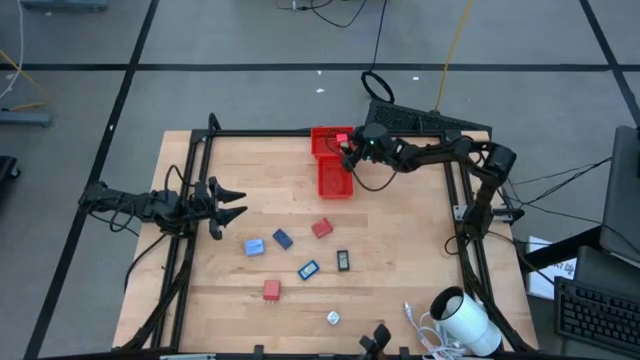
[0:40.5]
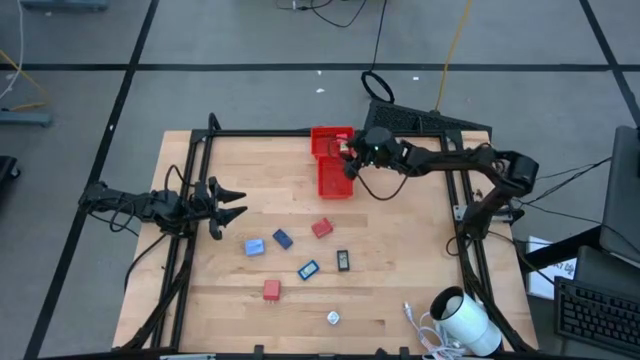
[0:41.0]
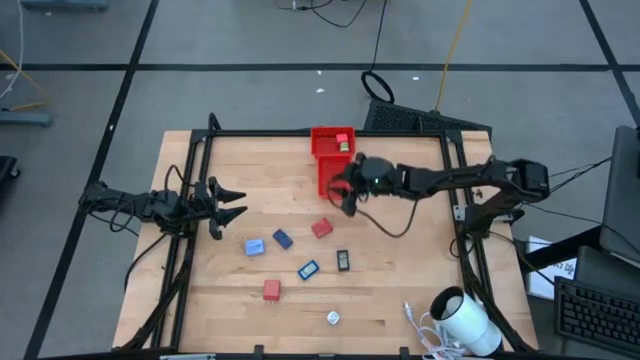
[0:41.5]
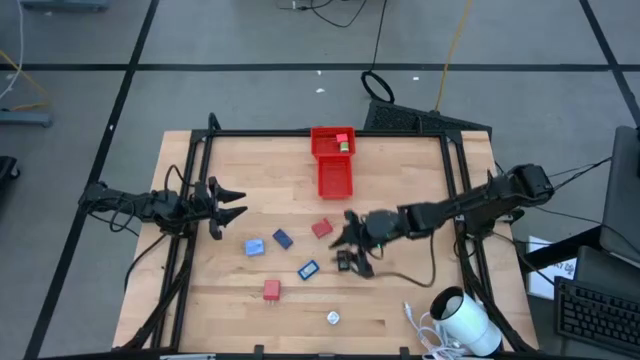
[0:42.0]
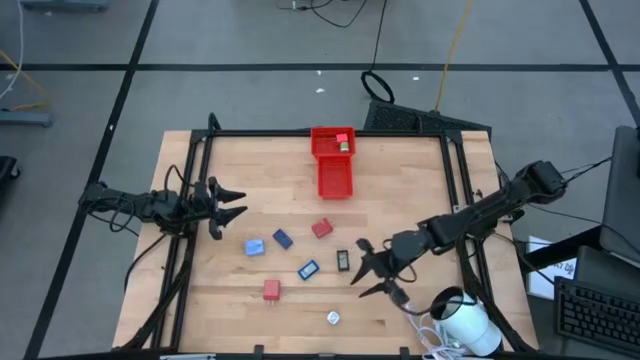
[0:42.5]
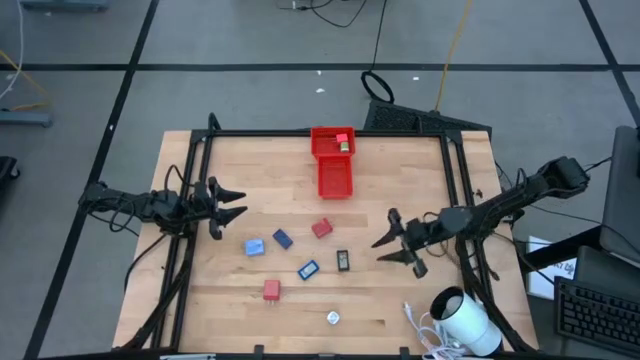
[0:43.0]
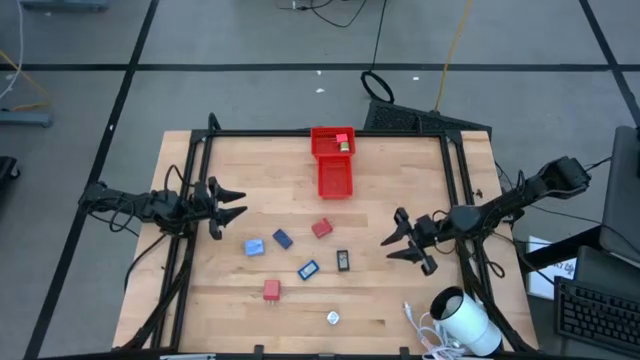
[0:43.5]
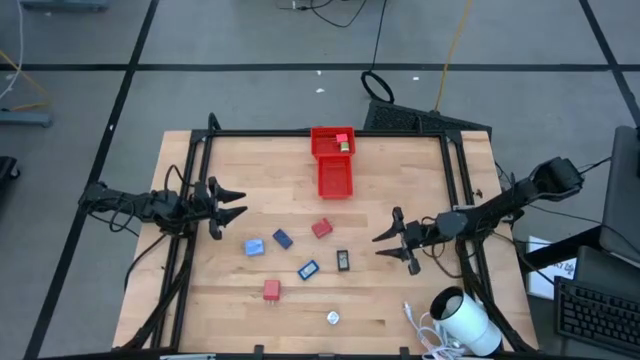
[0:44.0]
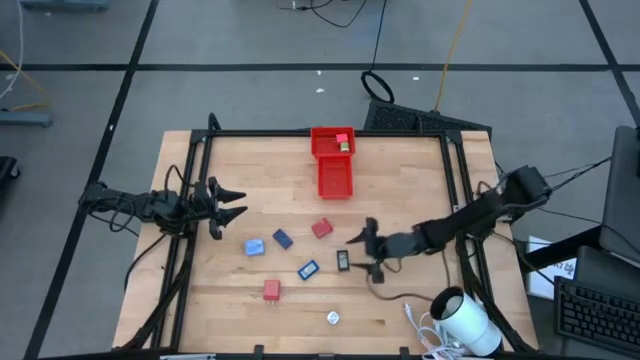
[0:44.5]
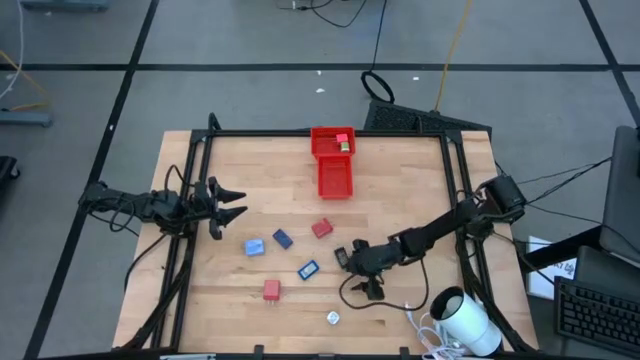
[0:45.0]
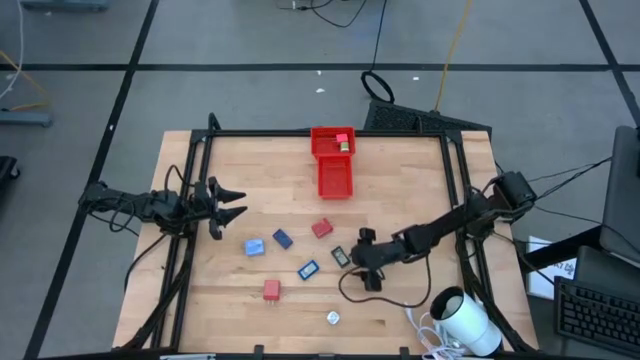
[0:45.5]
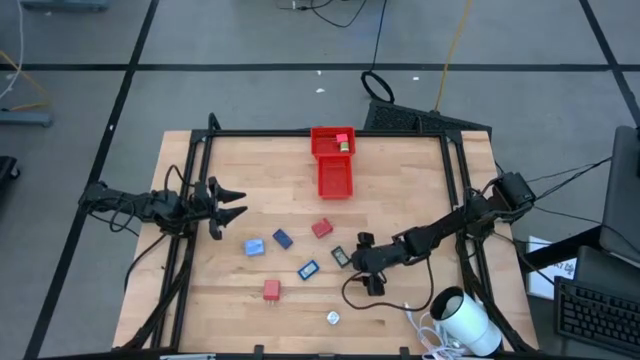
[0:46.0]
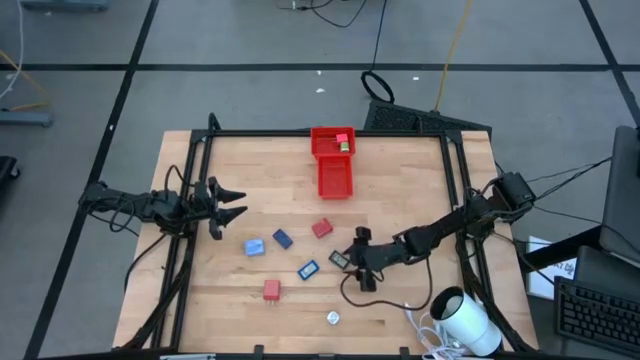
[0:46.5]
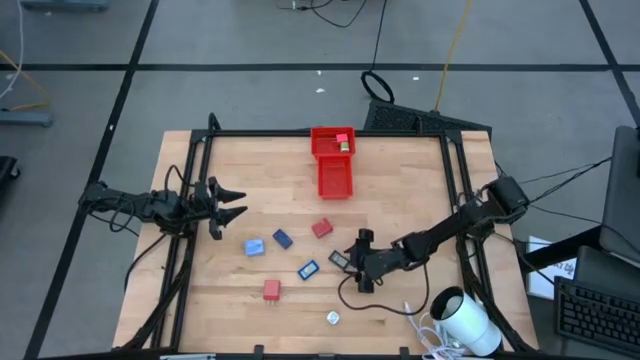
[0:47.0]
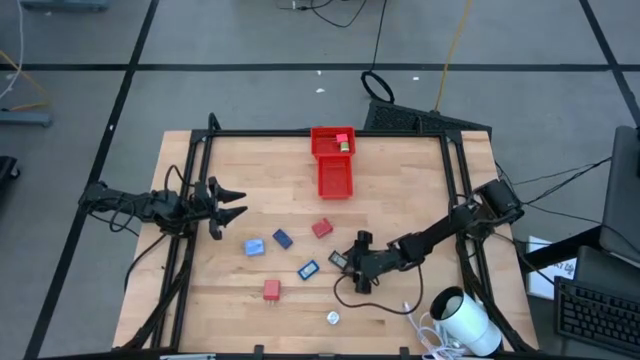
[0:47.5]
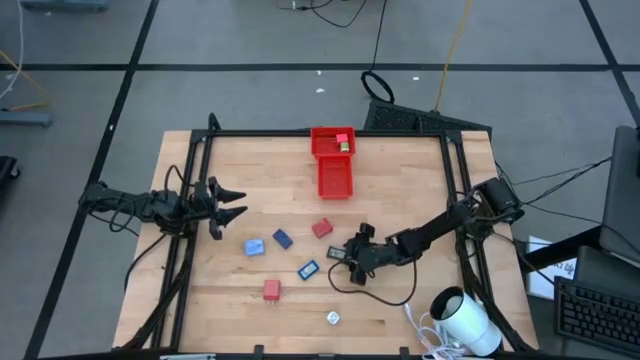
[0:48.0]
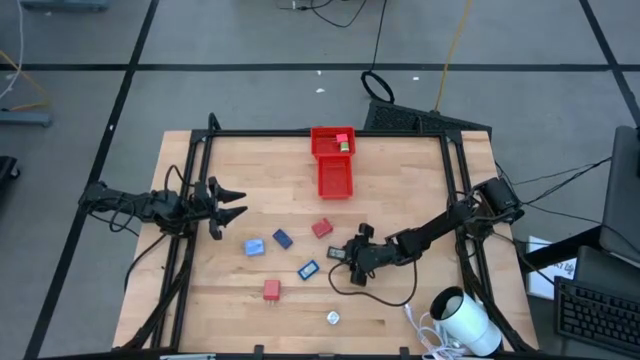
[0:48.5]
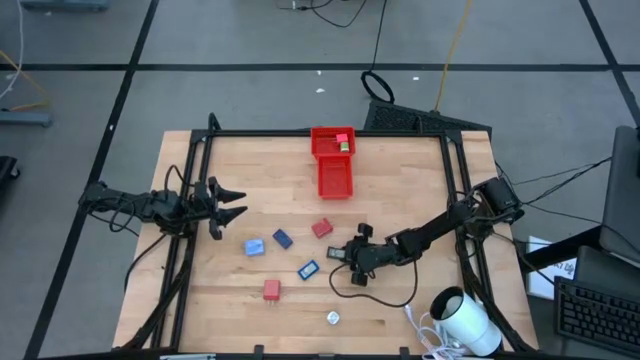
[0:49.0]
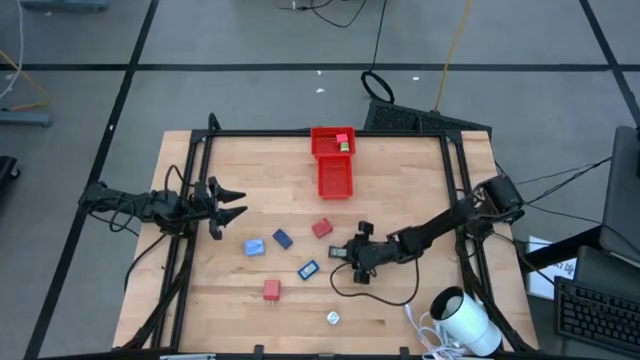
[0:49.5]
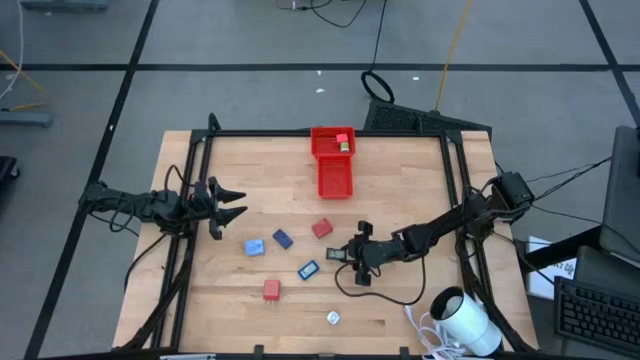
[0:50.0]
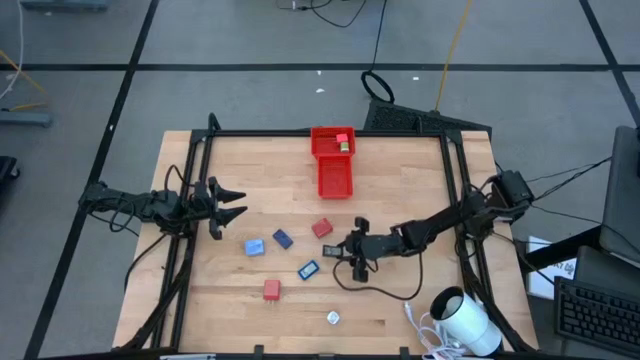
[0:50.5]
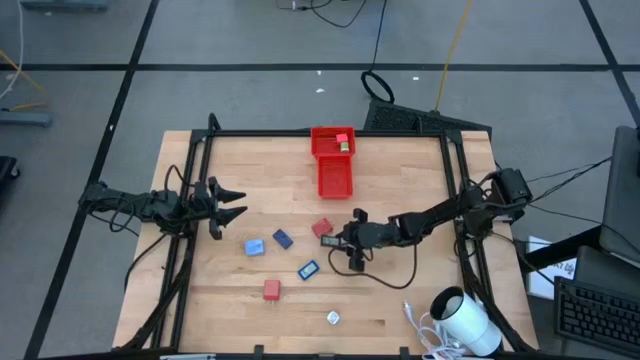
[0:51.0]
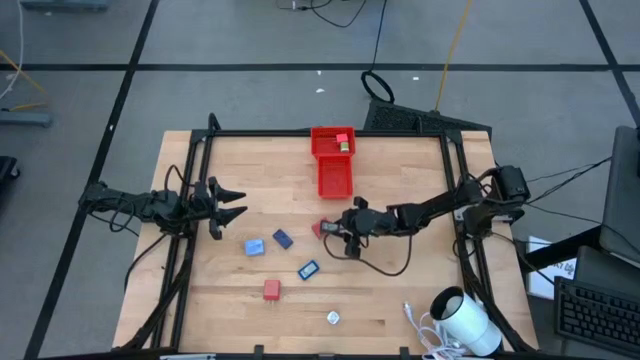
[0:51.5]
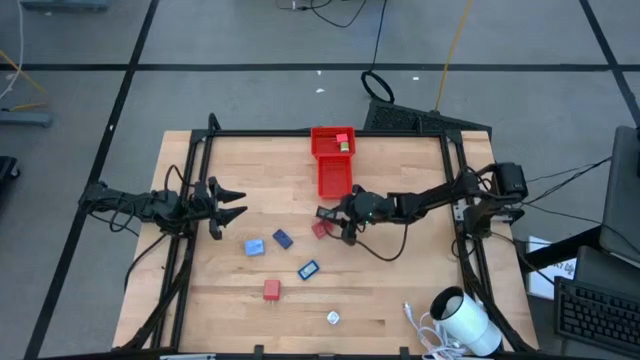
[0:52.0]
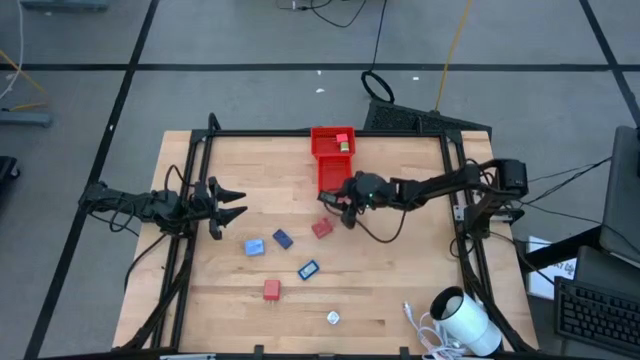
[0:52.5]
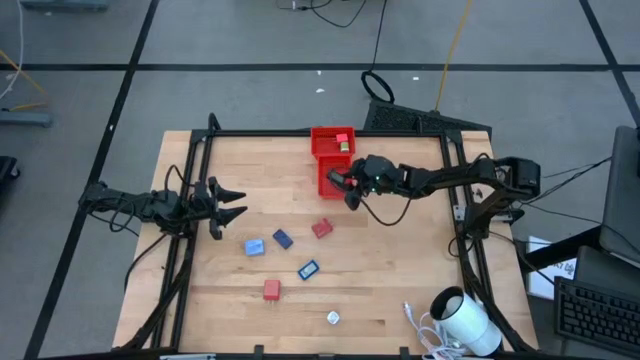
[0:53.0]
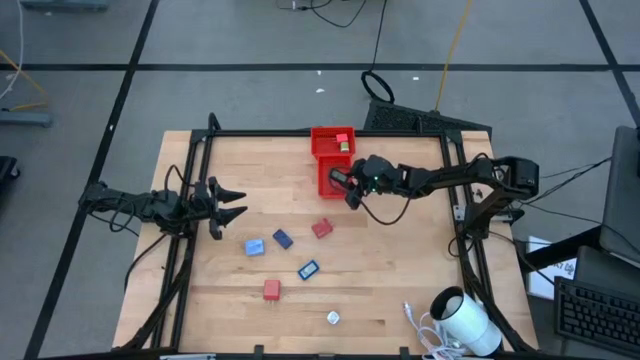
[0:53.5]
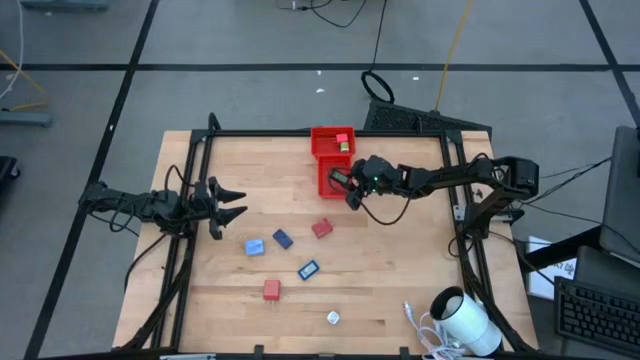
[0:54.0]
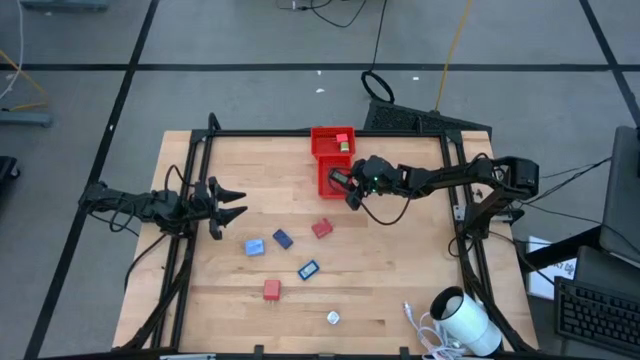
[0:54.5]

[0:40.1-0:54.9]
Task: Pick & Place Office items
Put the black digital timer into the bottom red bin

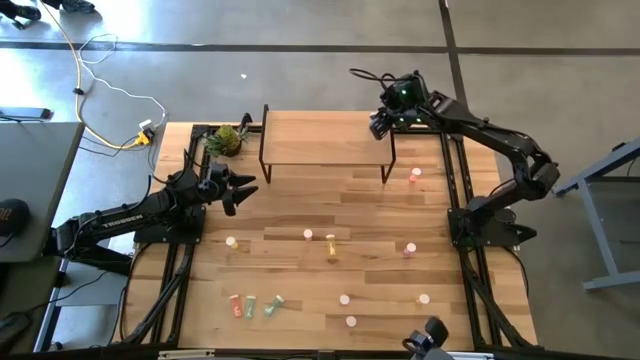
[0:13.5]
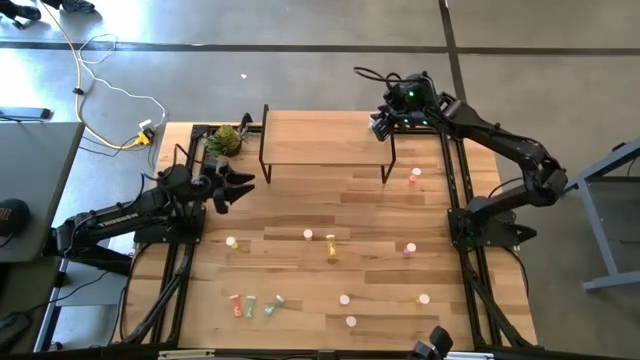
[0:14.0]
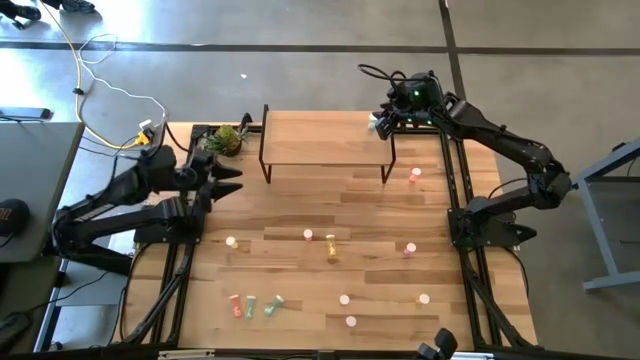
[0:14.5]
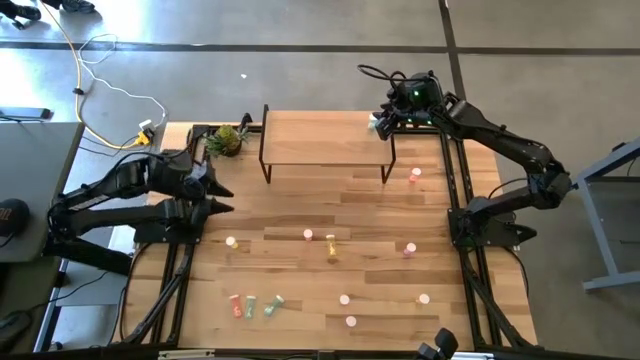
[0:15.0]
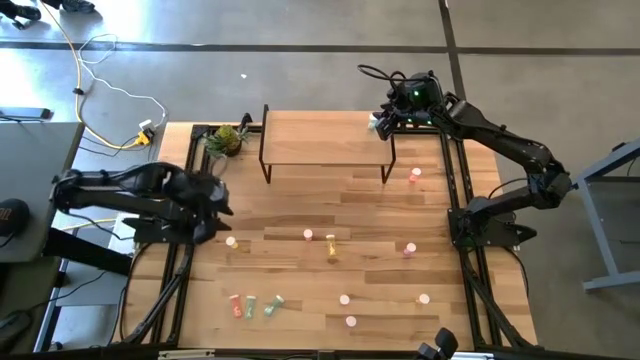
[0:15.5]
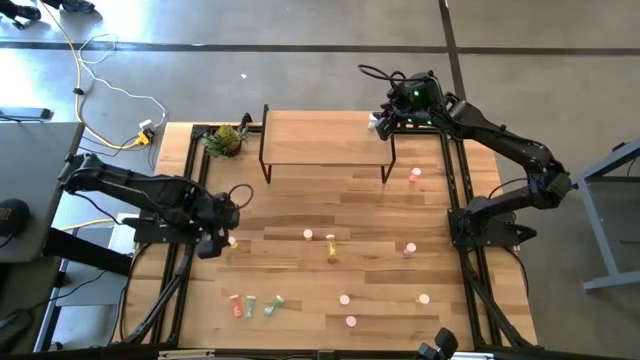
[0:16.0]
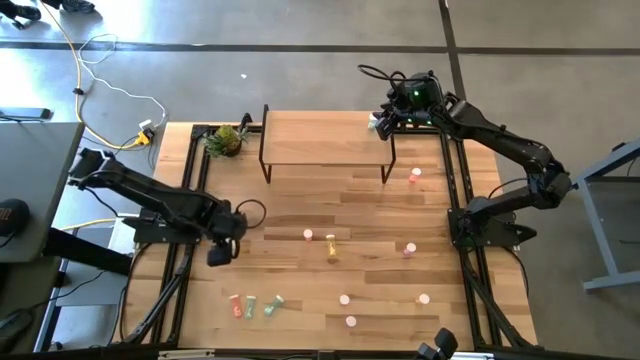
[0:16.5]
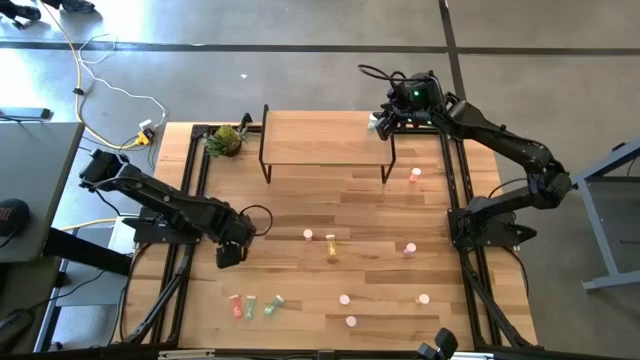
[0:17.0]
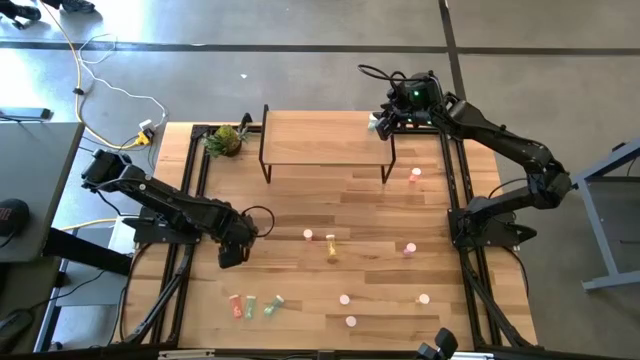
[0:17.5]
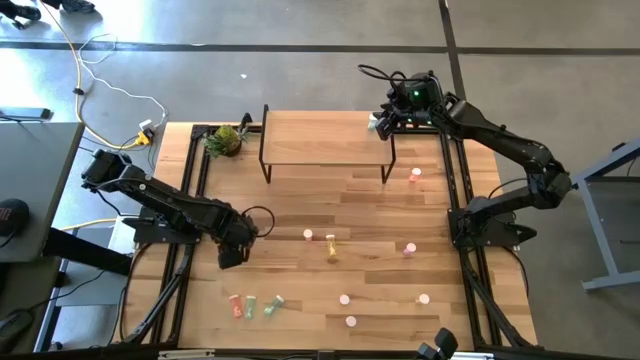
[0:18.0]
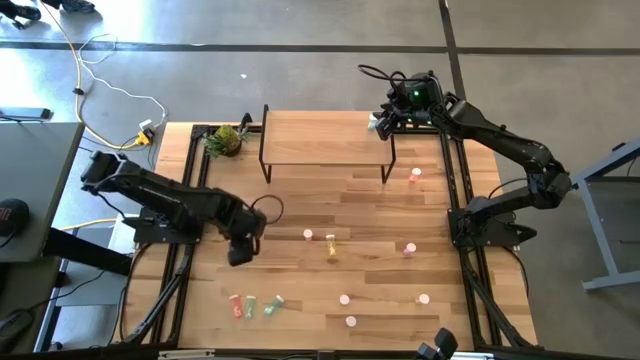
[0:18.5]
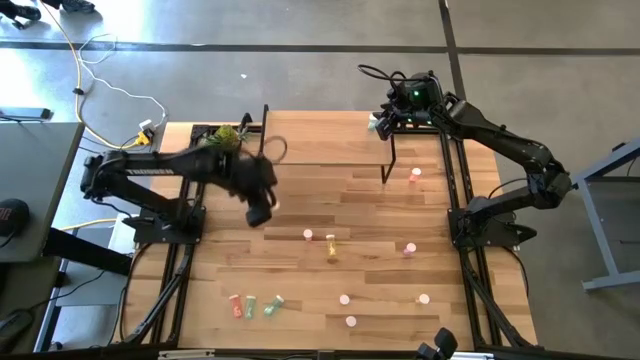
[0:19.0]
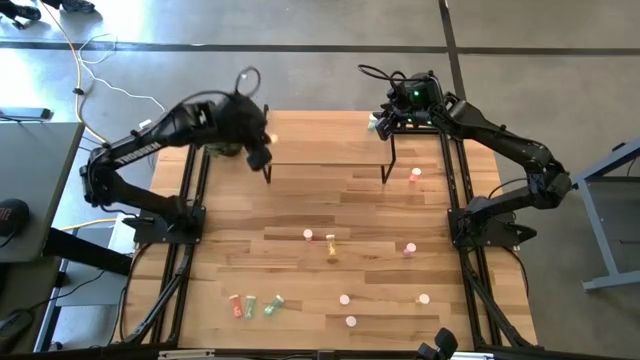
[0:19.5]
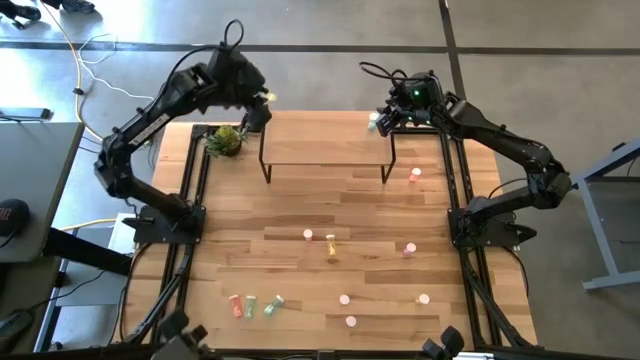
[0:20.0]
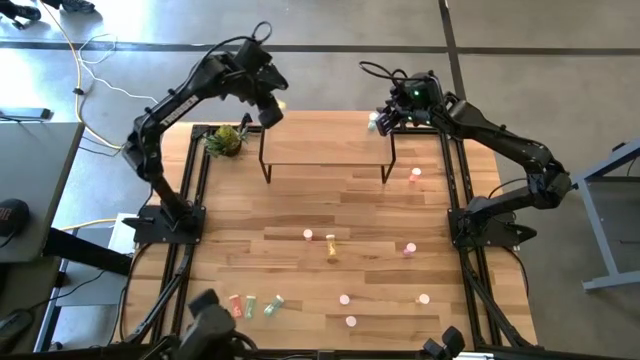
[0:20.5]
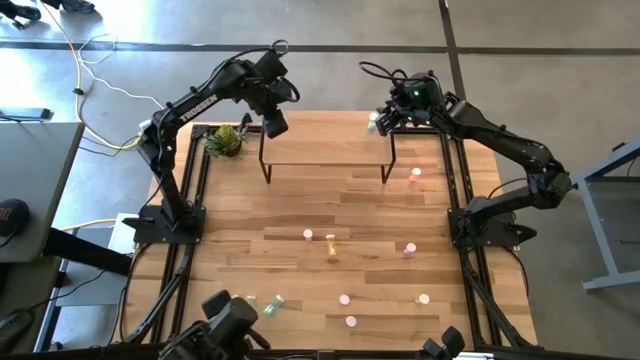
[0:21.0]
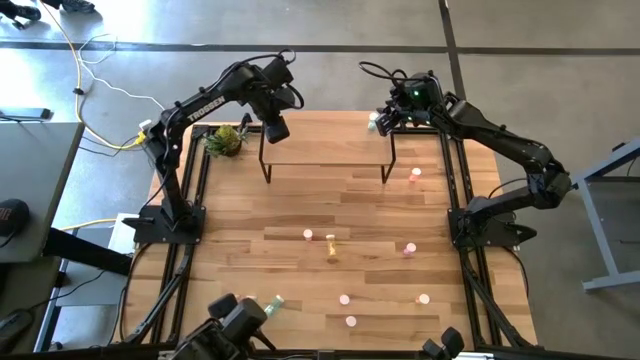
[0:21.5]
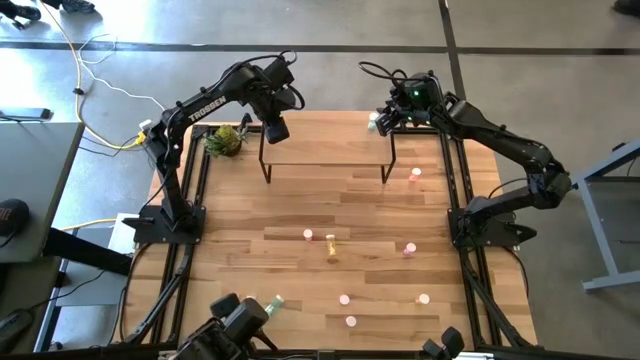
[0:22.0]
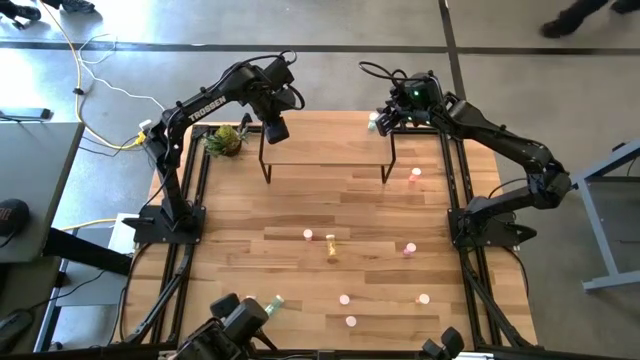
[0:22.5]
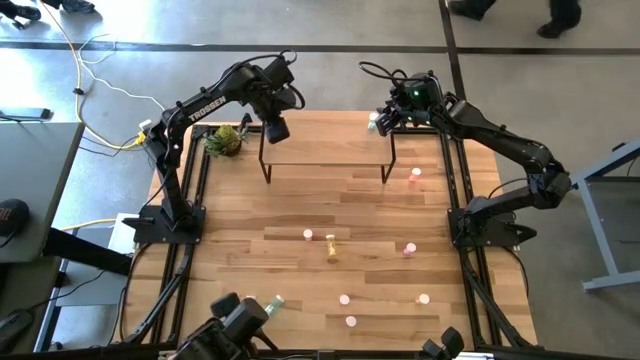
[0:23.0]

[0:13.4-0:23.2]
Task: Pick and place medicine bottles onto shelf by color
Put the top left yellow pill bottle on the shelf
